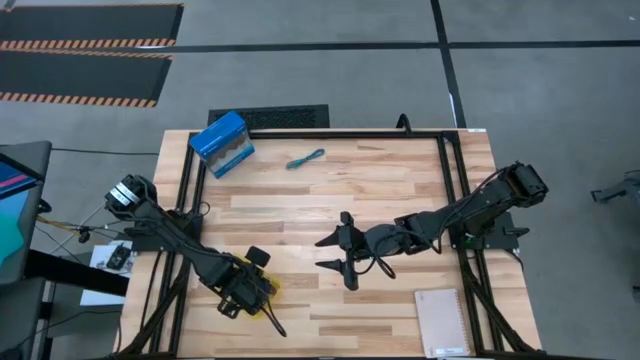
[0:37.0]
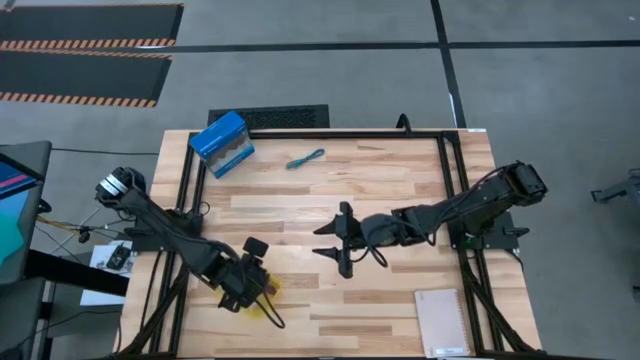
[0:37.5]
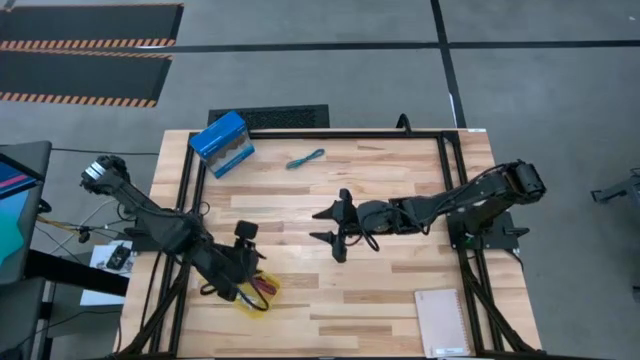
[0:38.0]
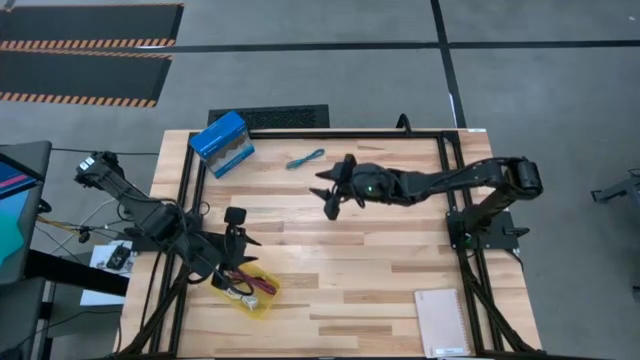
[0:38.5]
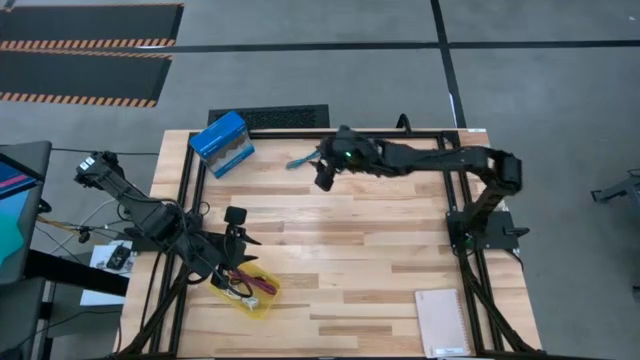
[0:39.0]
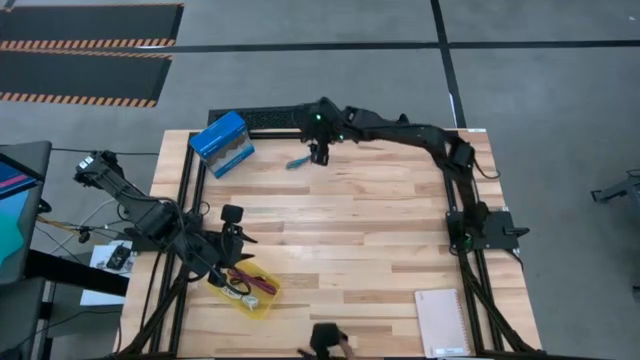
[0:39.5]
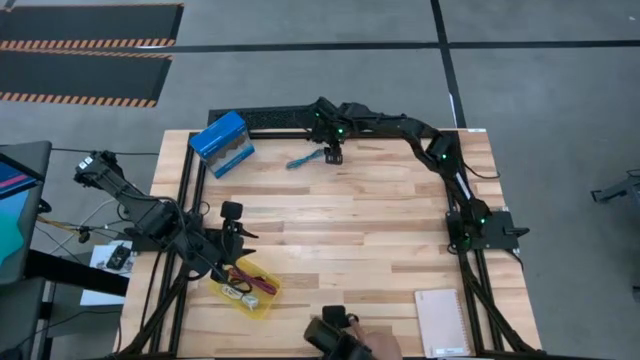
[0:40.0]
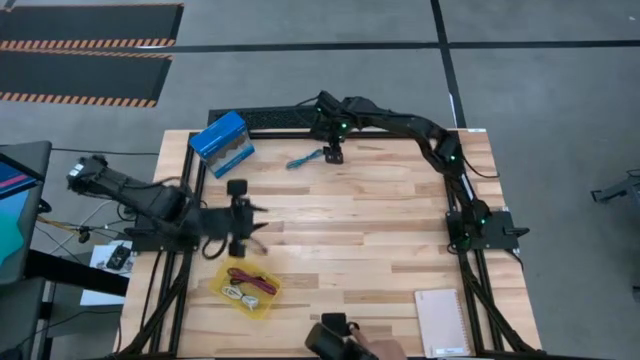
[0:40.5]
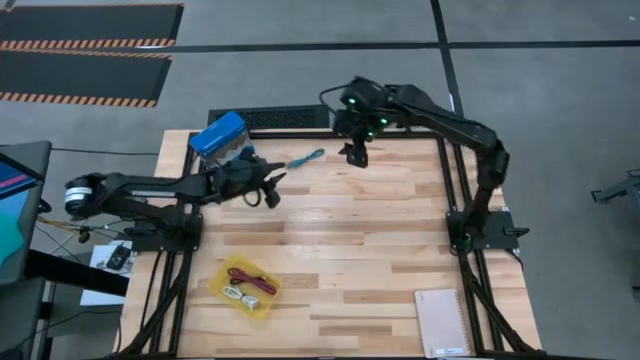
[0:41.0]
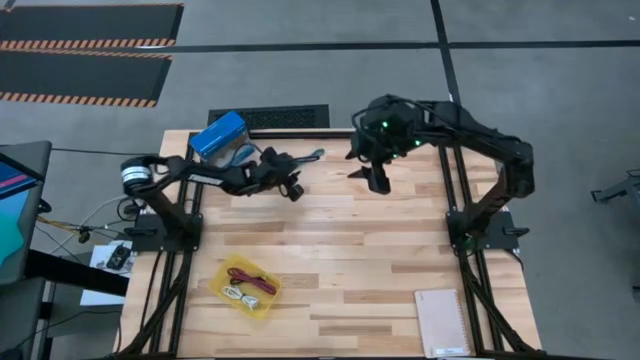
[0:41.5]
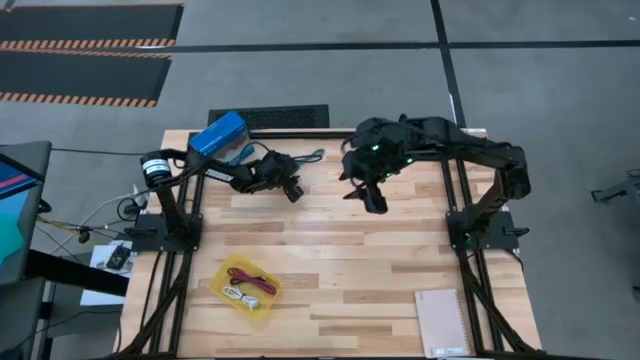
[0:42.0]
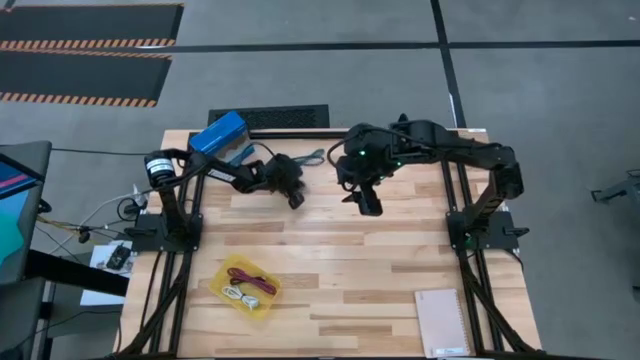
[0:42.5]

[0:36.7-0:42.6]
Task: Pick and place USB-C Cables
Put the blue charger cable into the yellow bin

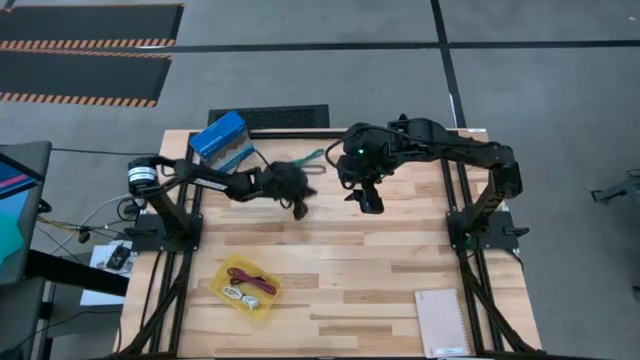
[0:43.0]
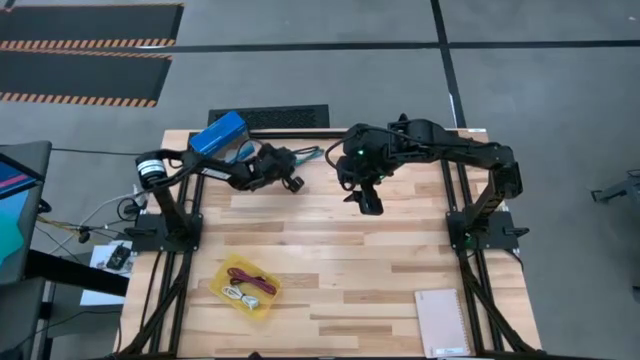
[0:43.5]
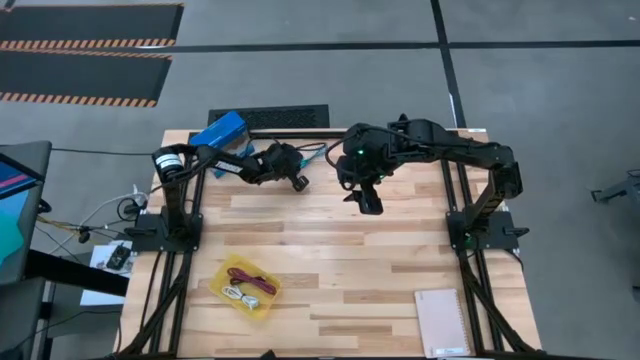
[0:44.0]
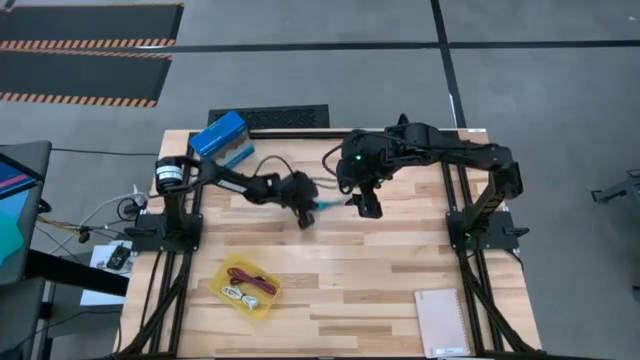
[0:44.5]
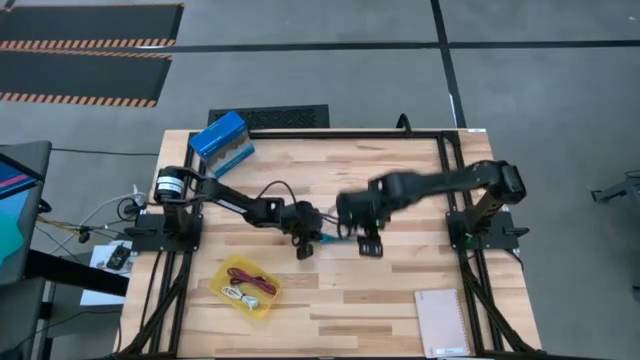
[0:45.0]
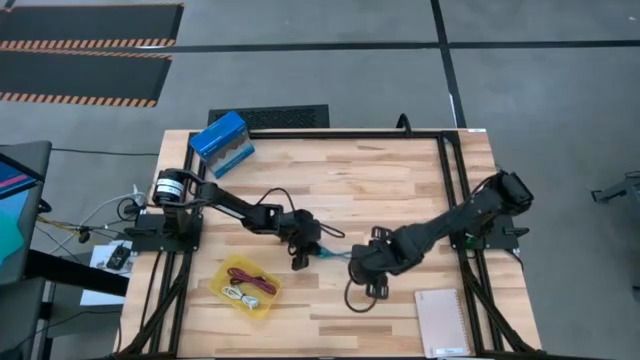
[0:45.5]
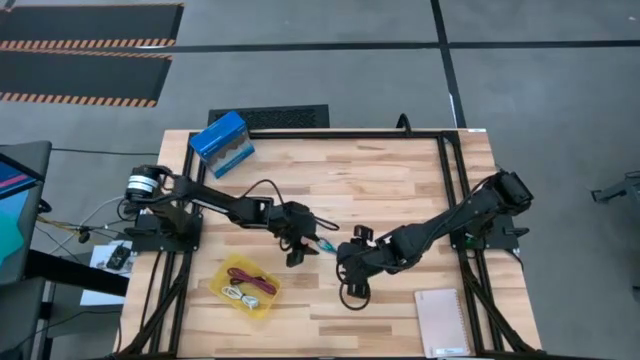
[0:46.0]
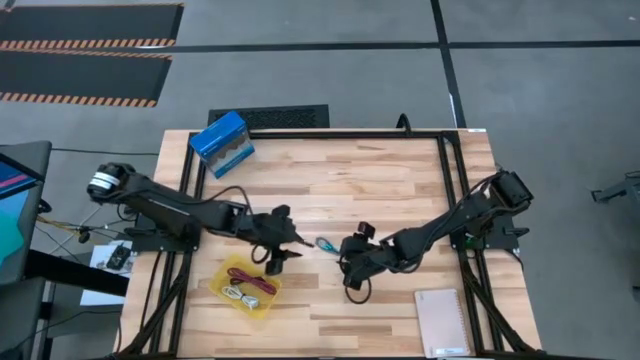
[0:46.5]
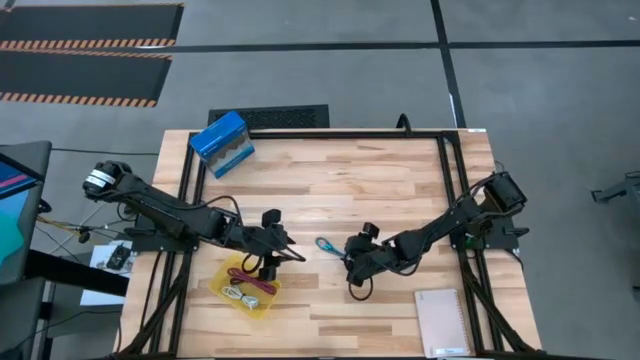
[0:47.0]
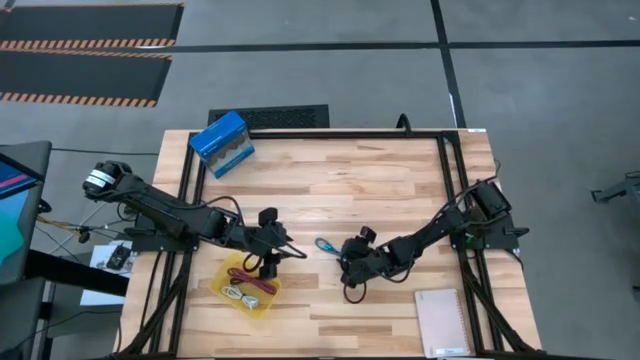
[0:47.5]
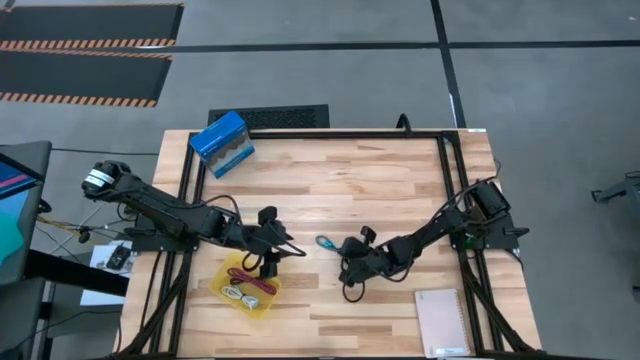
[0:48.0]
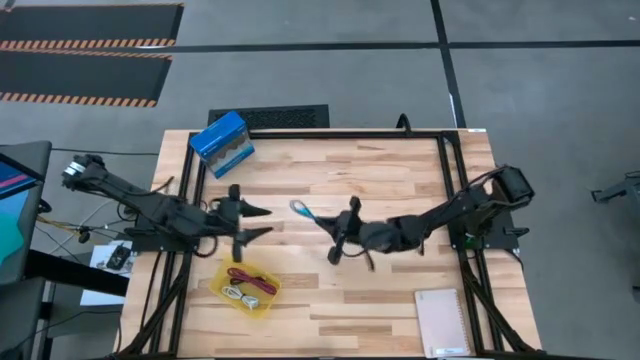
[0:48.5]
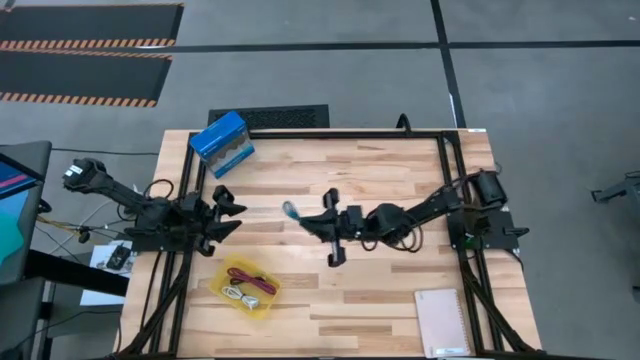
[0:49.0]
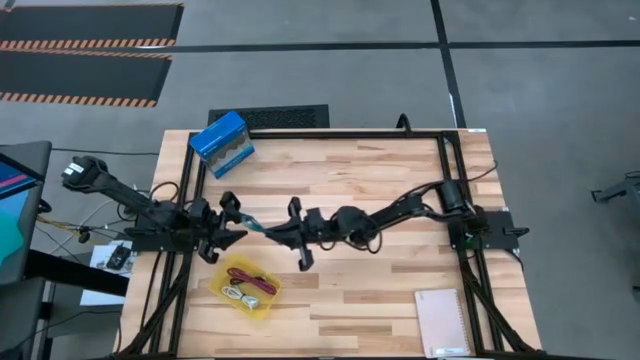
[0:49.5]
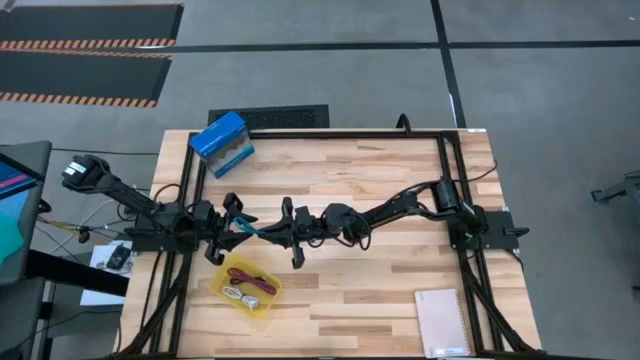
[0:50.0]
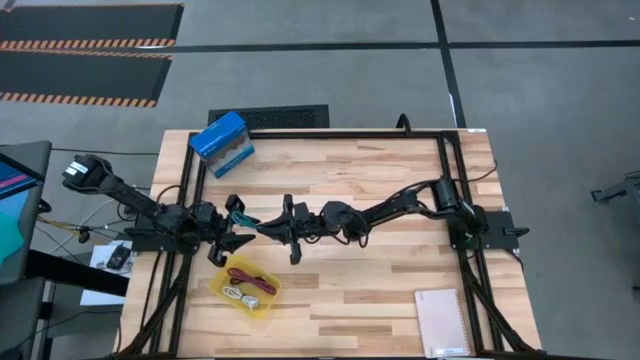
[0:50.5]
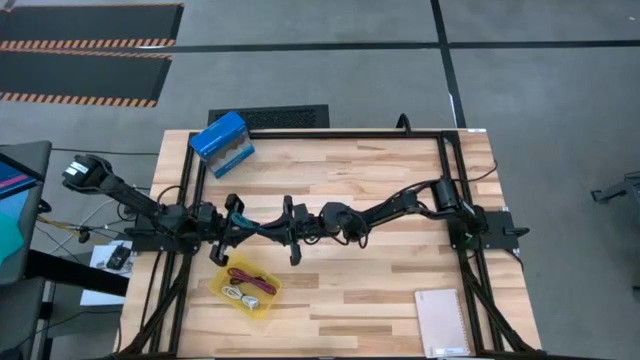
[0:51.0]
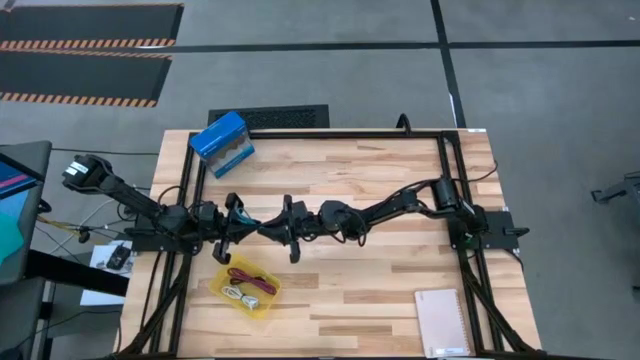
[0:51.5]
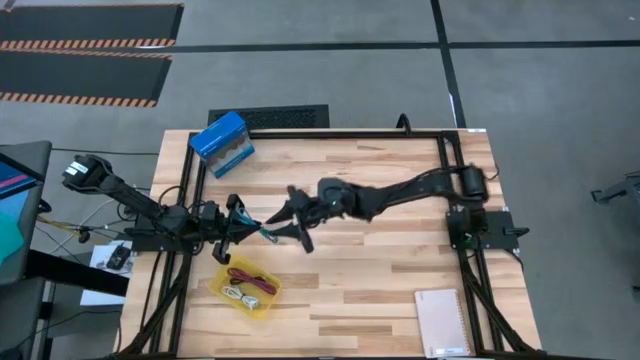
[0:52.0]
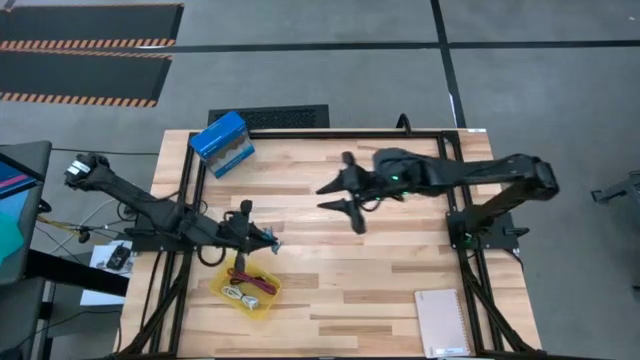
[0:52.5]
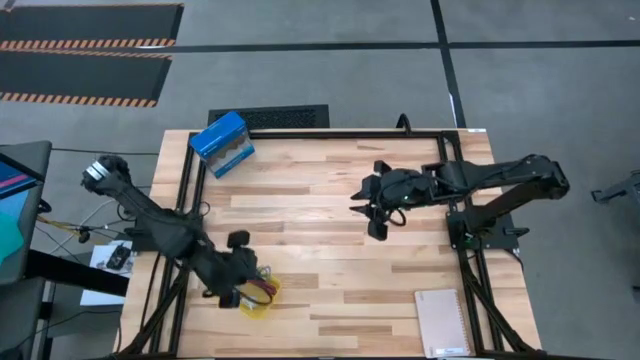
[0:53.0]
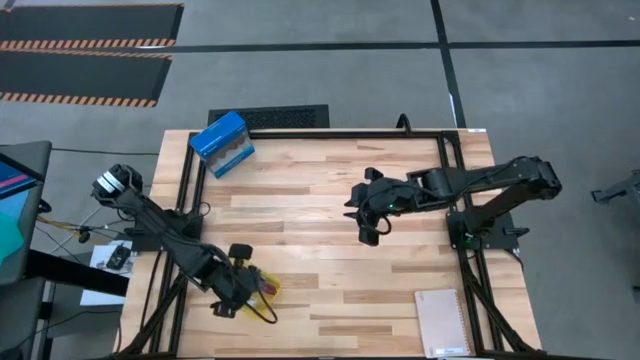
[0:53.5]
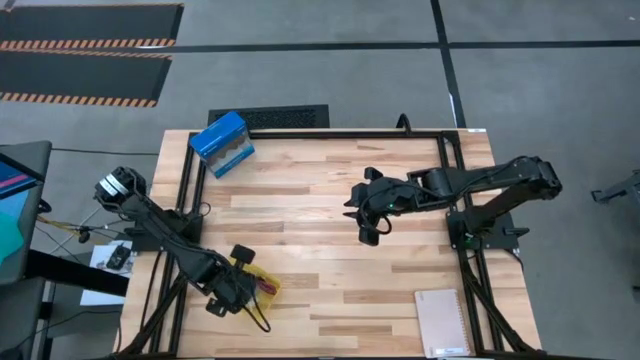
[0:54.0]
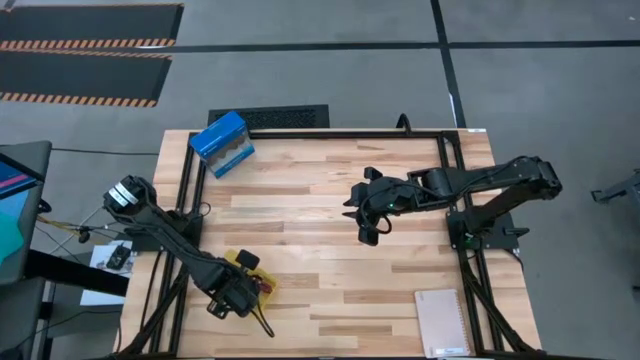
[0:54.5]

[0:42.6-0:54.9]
Put the blue charger cable into the yellow bin

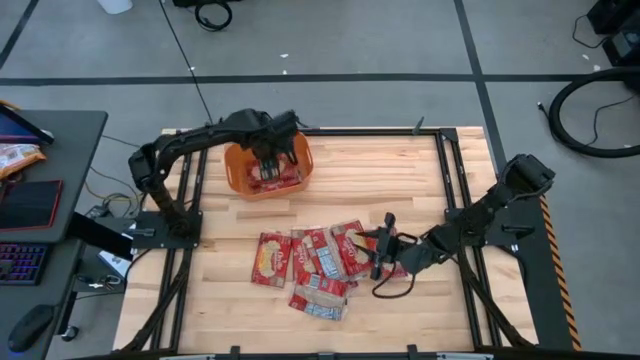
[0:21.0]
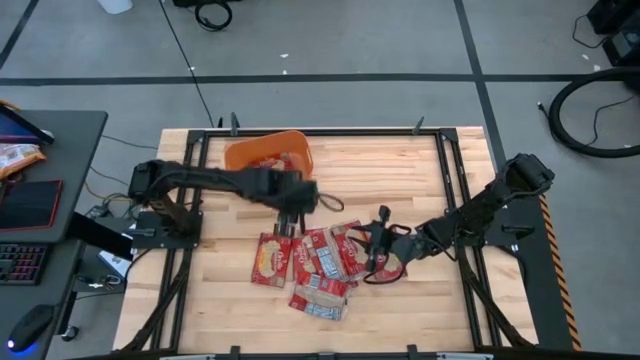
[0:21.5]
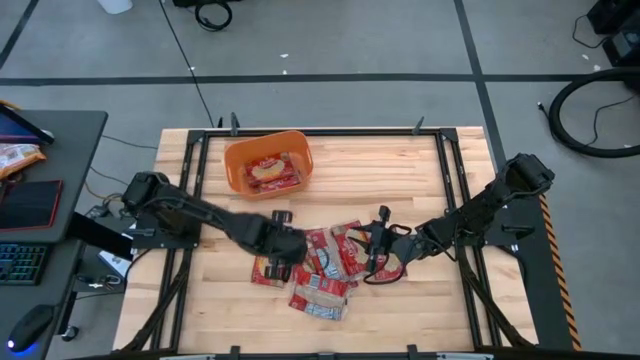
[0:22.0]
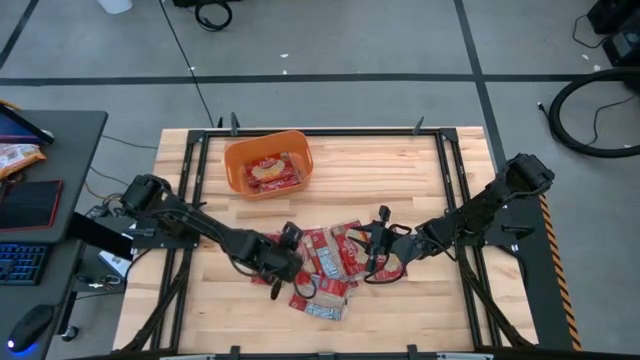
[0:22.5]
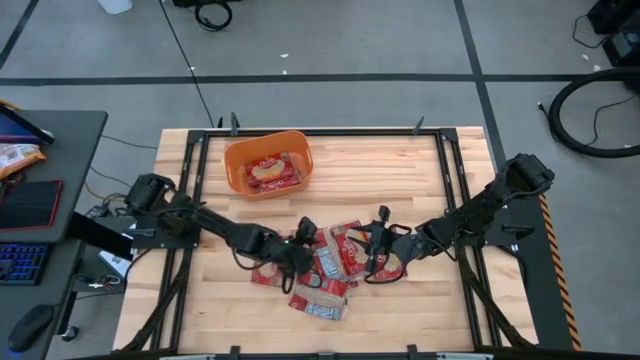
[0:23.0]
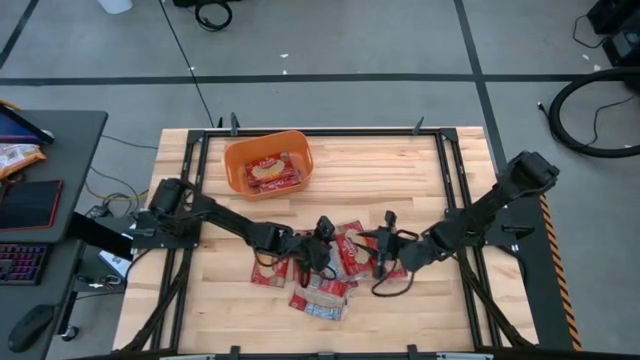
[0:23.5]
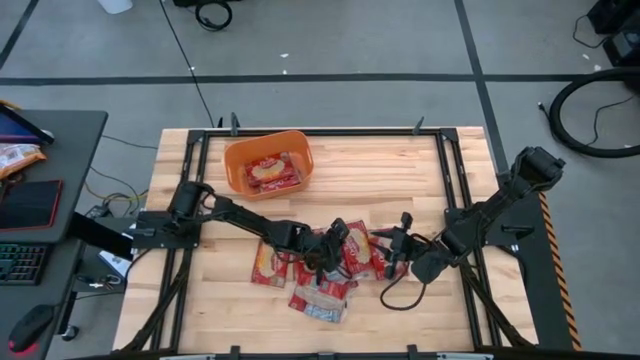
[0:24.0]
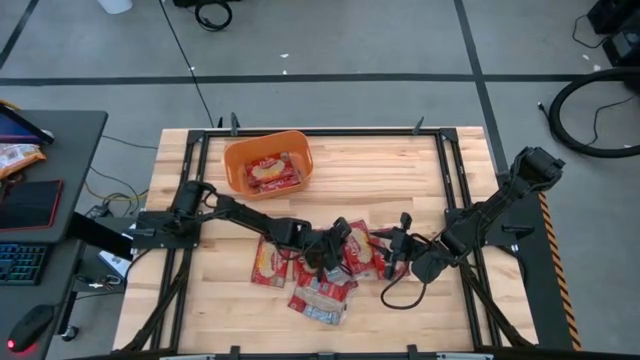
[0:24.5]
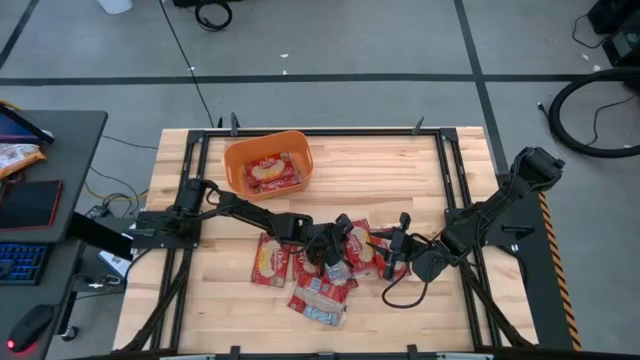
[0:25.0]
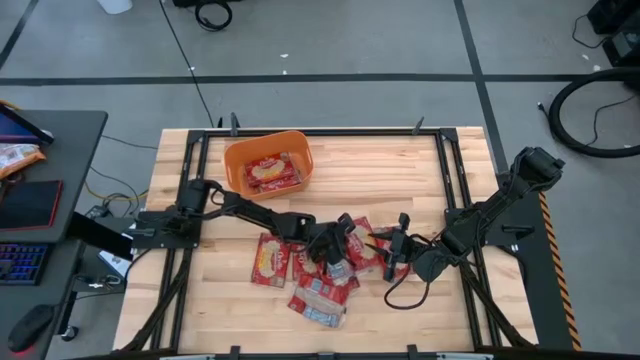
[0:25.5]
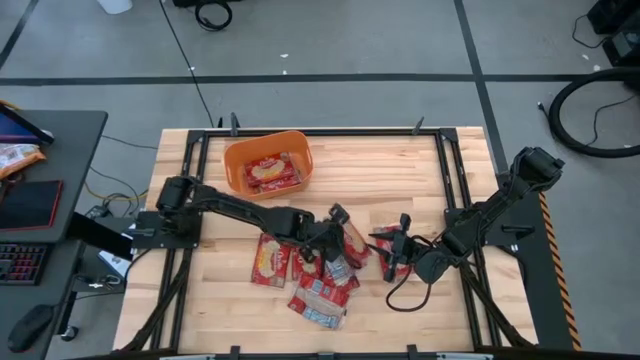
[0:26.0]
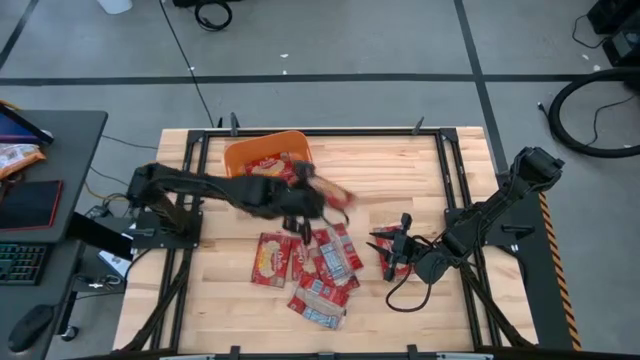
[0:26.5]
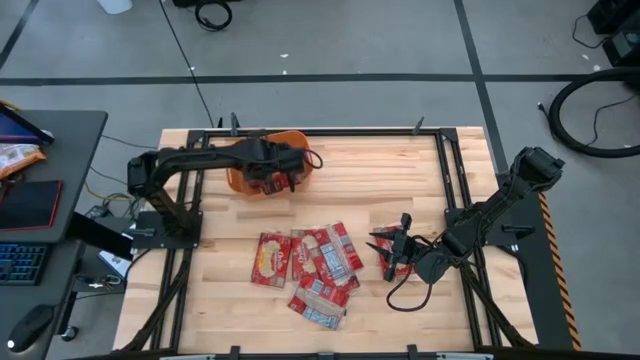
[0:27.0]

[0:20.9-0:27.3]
Task: Sort popcorn bags into baskets
Put the red popcorn bag into the orange bin
